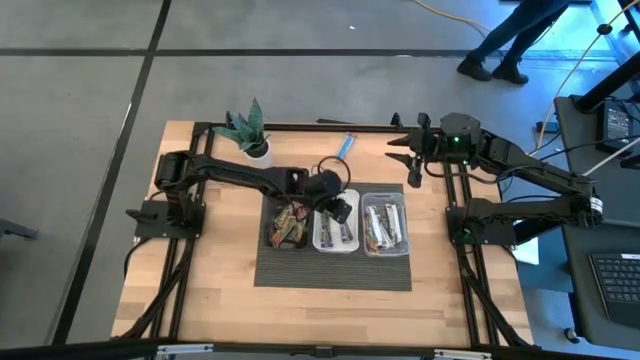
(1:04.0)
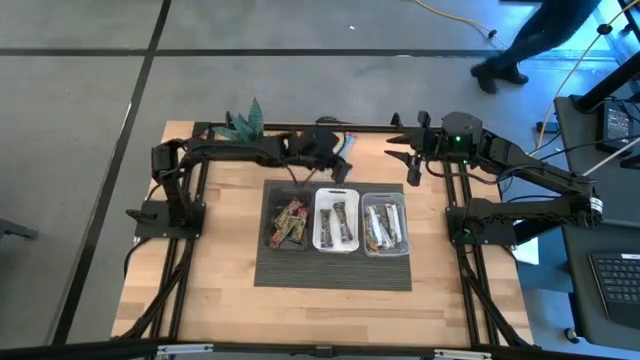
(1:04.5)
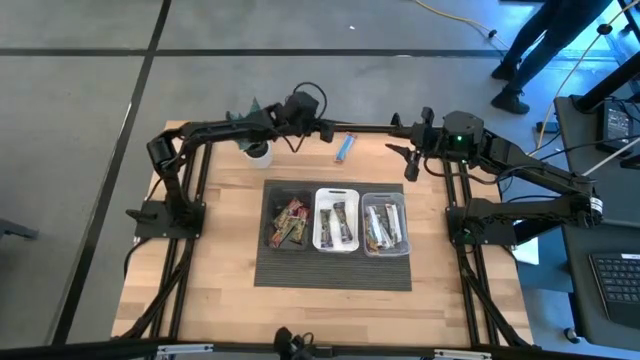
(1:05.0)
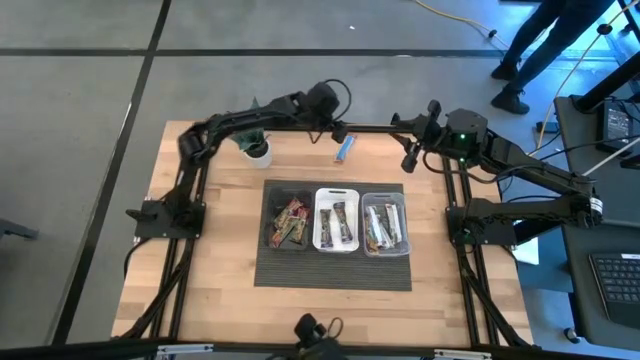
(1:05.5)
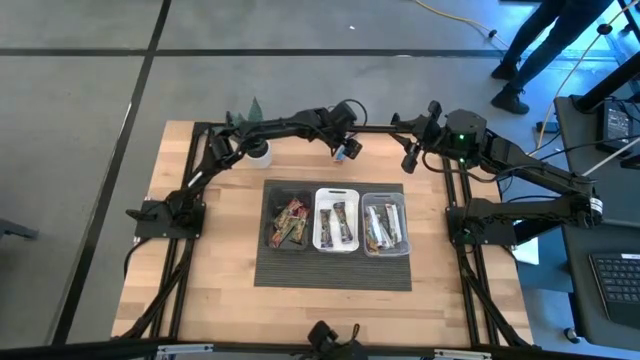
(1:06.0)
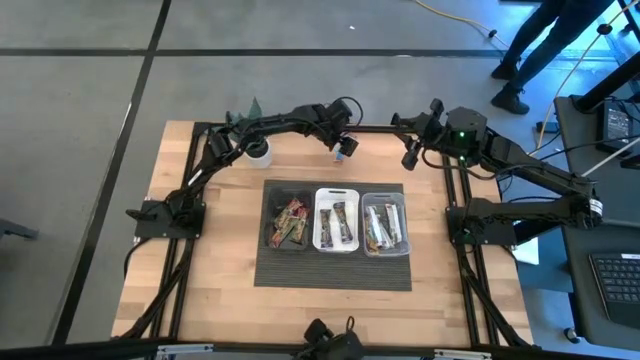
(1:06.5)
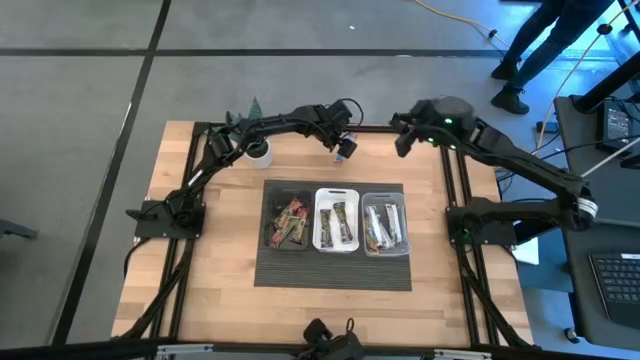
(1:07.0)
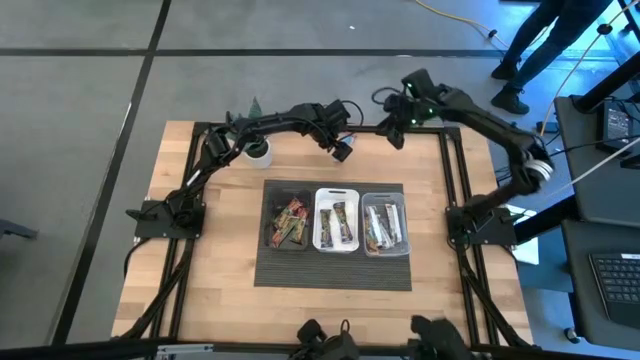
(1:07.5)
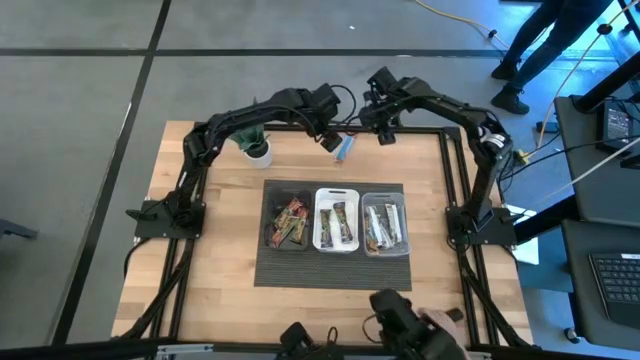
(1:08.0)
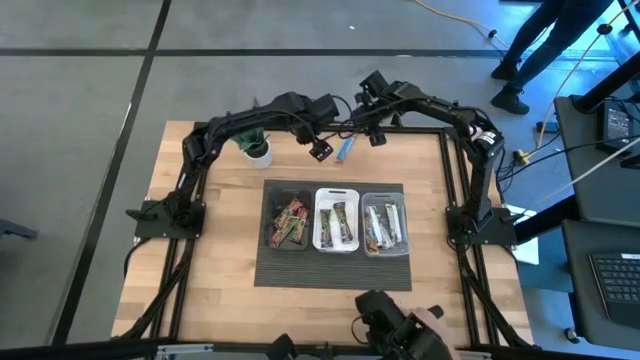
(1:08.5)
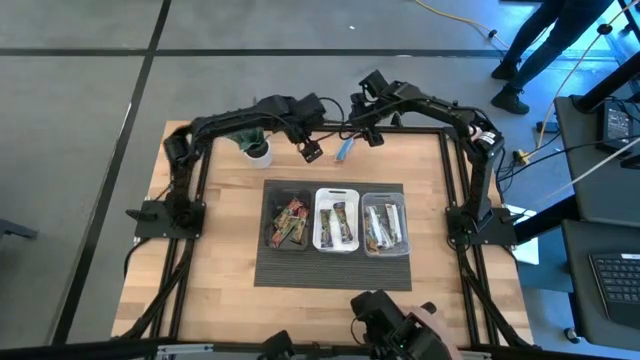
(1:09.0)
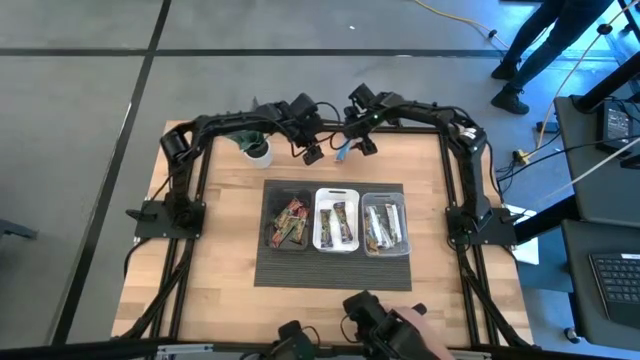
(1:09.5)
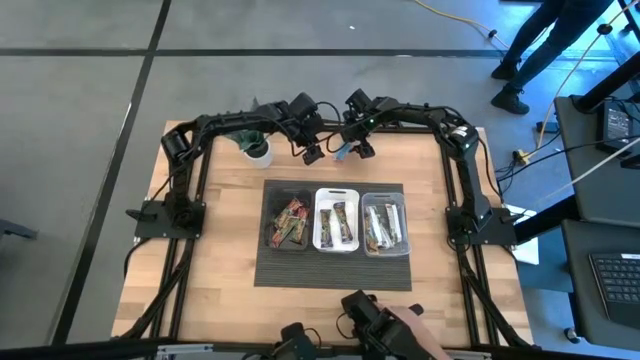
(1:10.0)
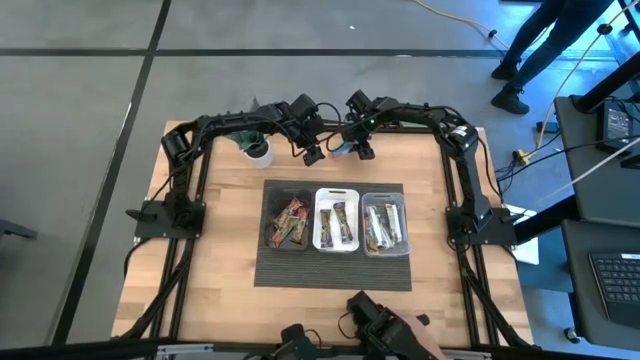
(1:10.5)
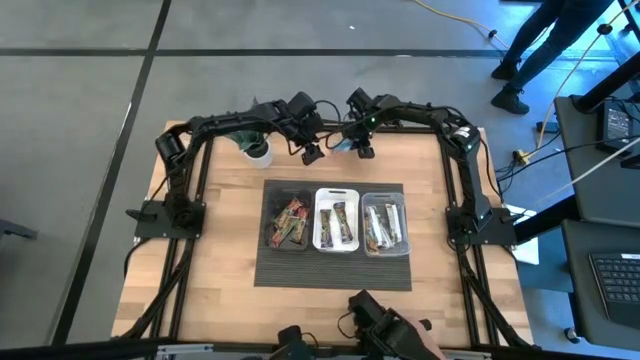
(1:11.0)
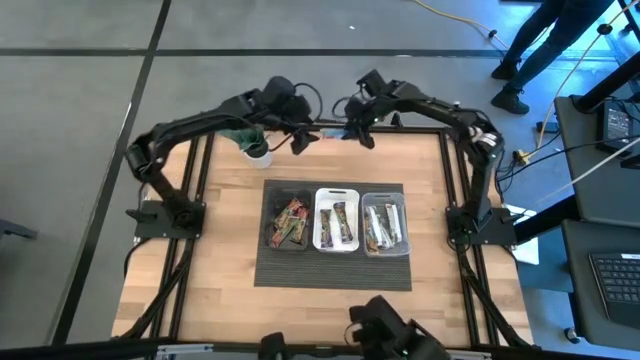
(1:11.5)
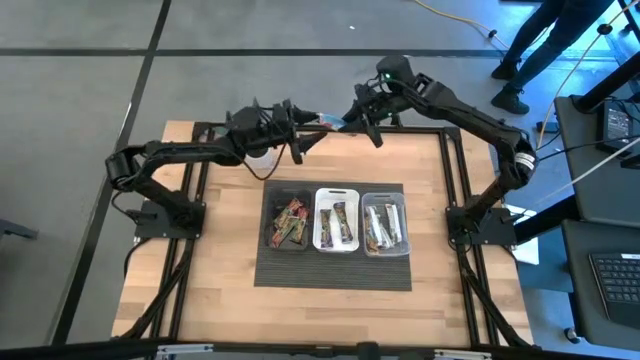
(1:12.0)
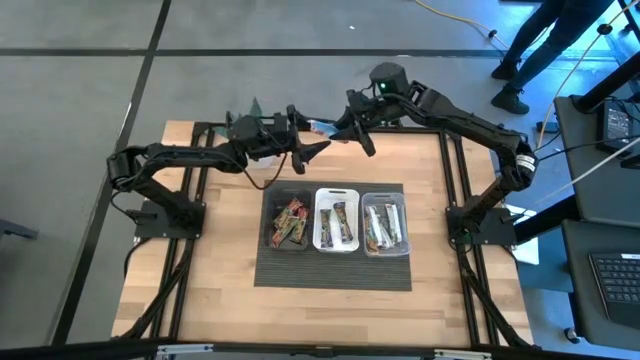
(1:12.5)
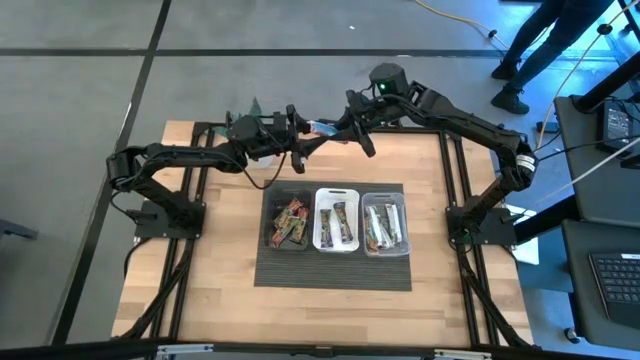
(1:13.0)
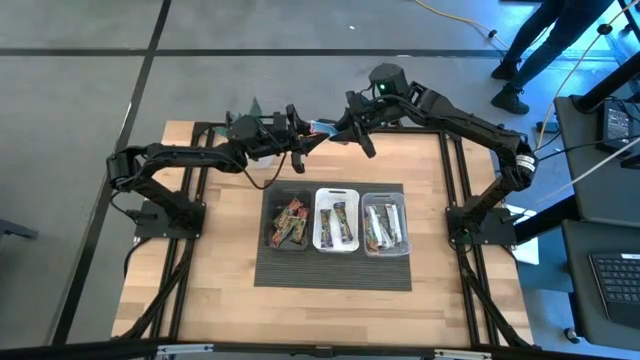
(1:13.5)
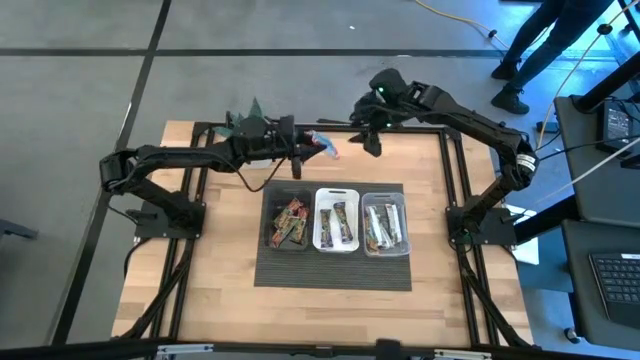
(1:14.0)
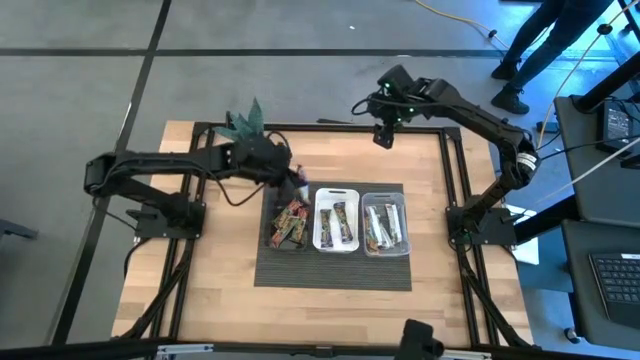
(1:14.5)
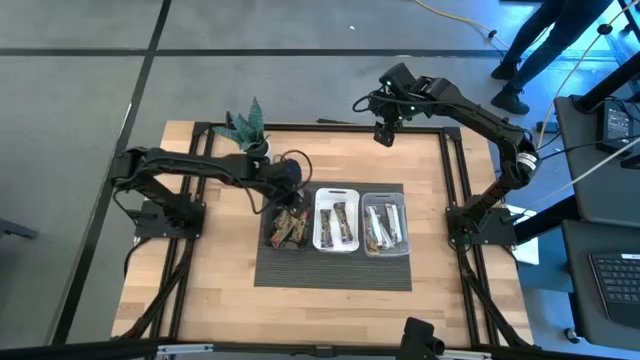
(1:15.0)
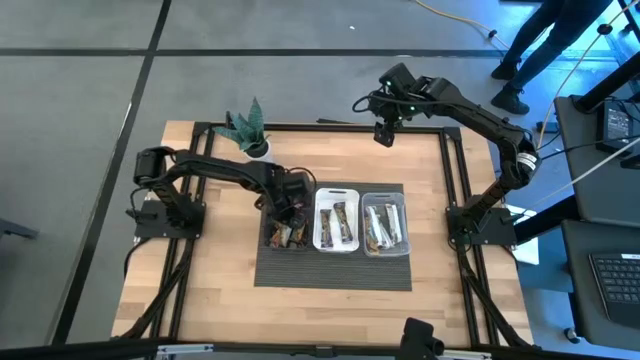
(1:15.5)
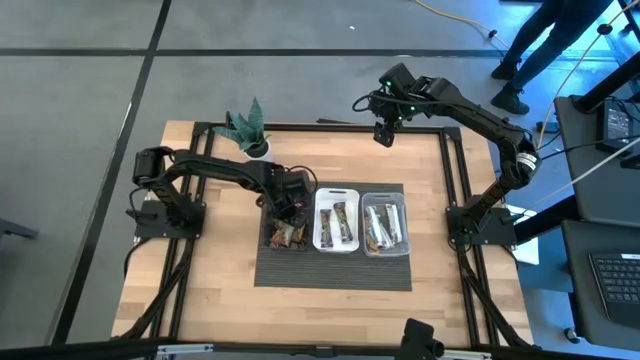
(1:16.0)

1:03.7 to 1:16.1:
Task: Pick and place Granola Bars by type
Put the red granola bar into the black bin

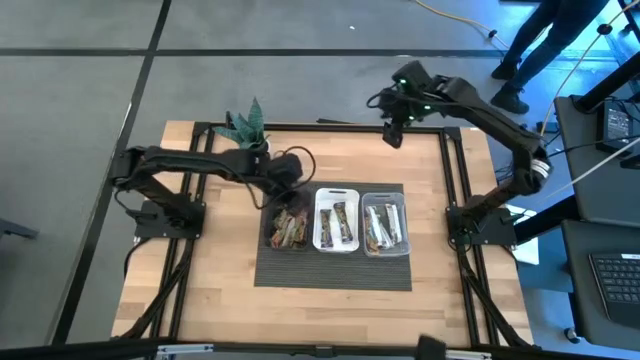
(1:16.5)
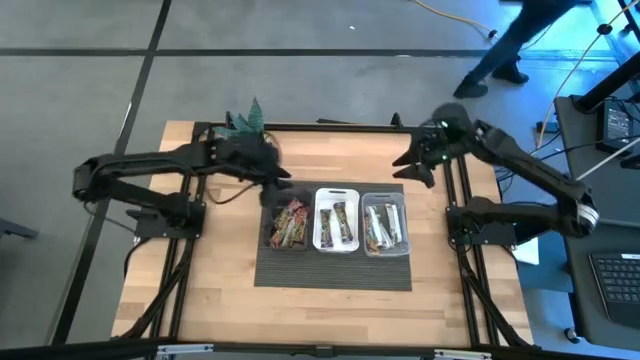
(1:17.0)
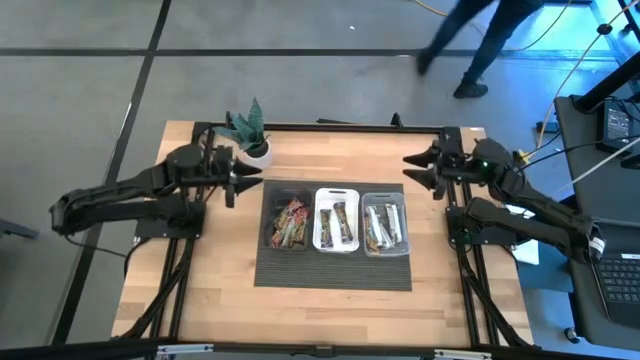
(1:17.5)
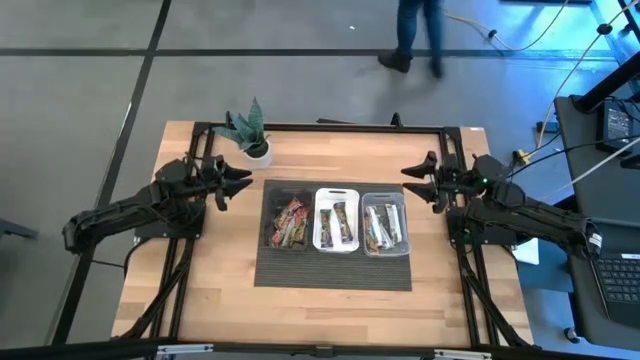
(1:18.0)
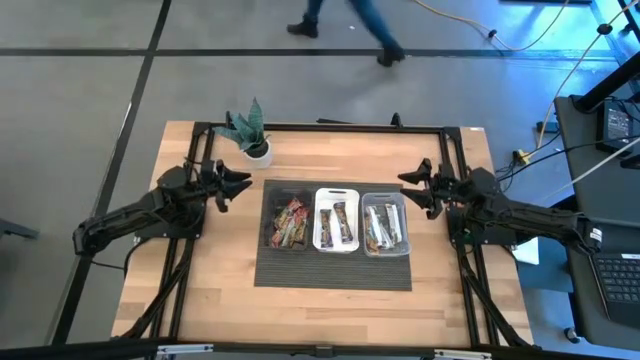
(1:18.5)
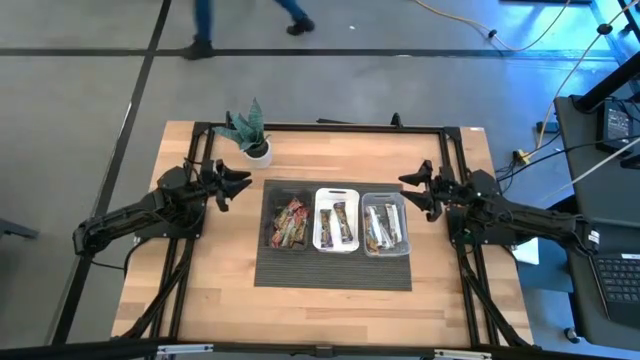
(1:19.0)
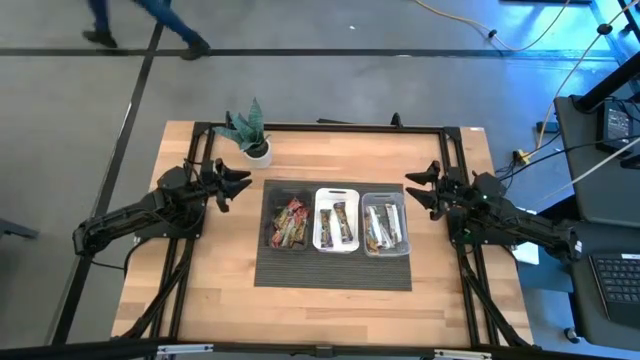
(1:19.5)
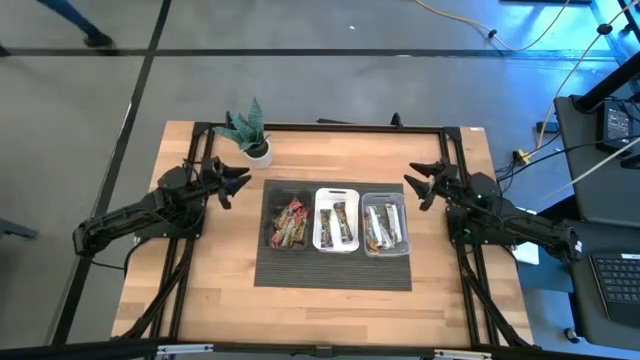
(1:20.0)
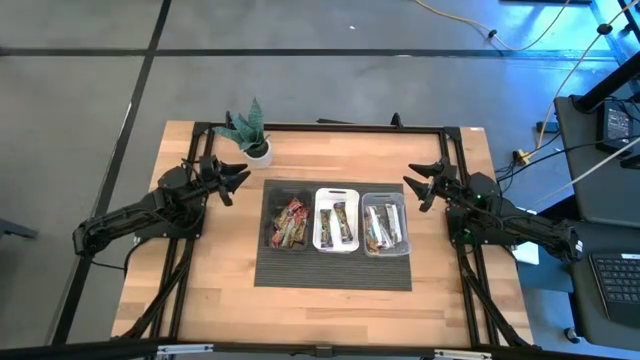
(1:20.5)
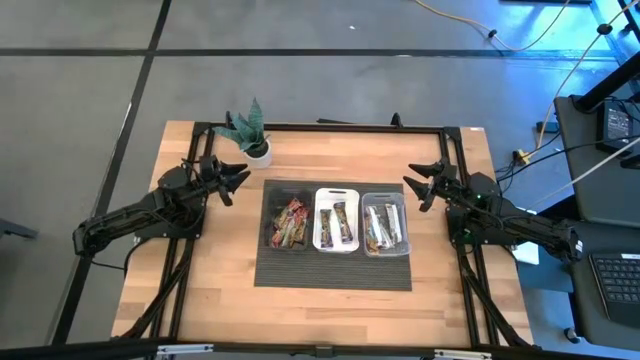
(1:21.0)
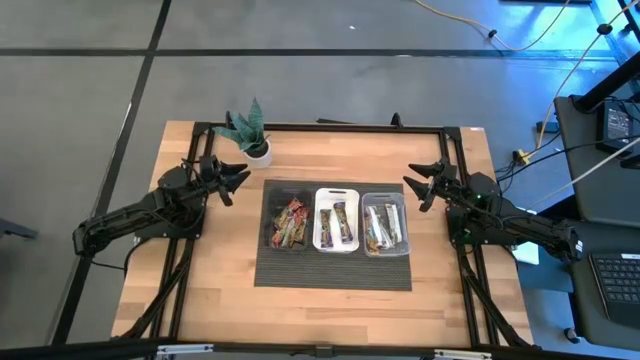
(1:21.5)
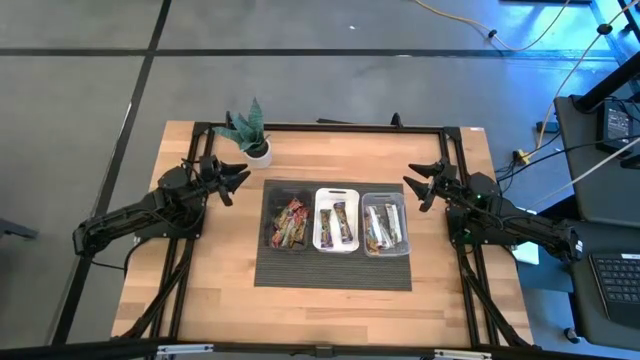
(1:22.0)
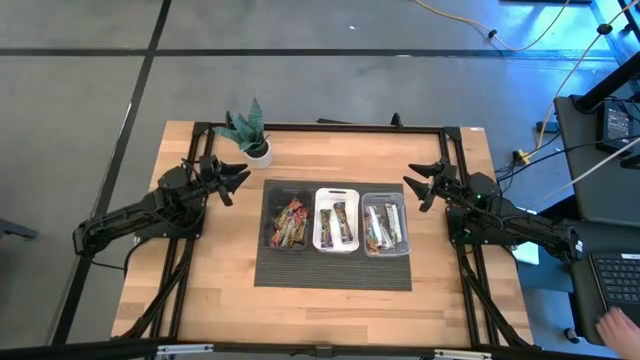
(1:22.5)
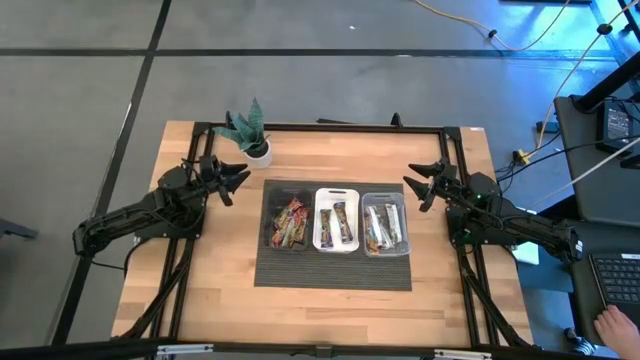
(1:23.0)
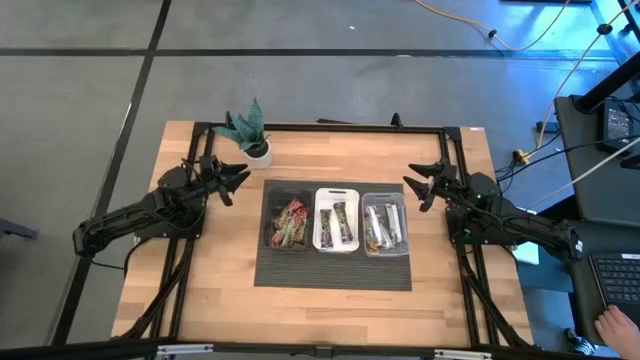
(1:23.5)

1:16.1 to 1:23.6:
Return to Home Position

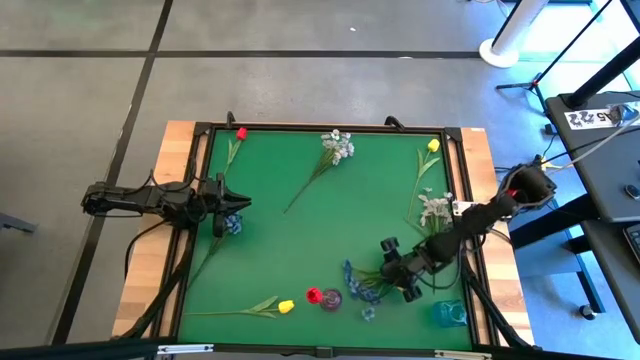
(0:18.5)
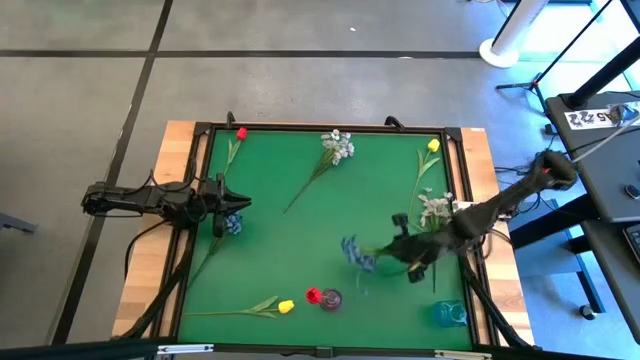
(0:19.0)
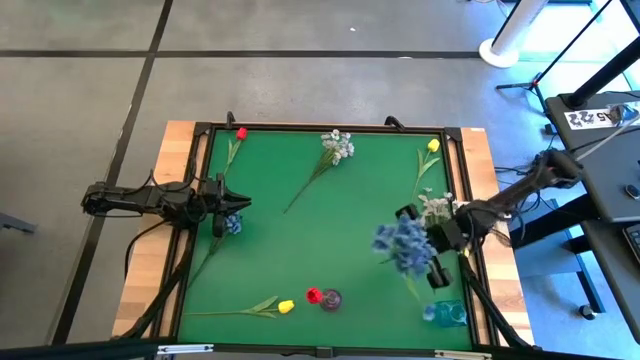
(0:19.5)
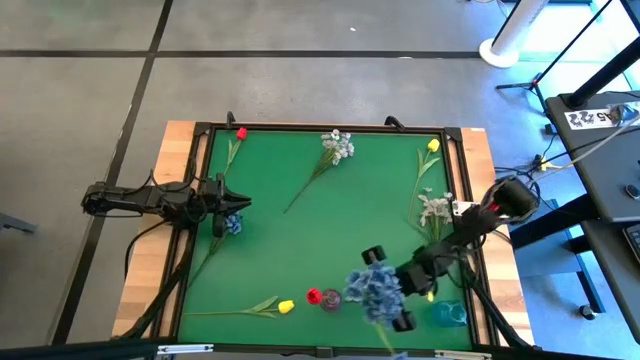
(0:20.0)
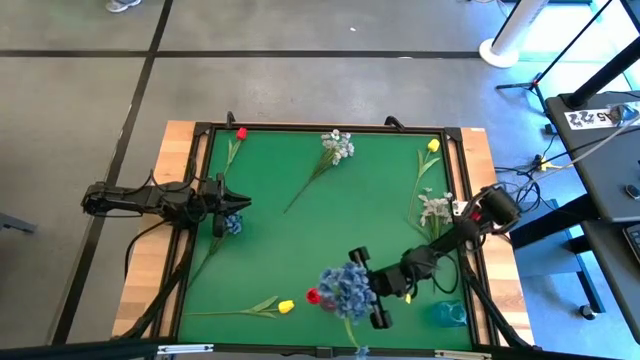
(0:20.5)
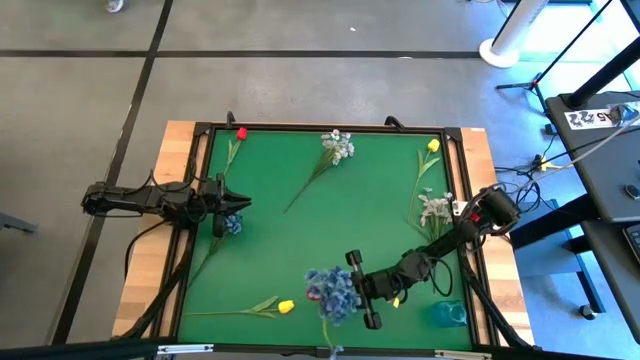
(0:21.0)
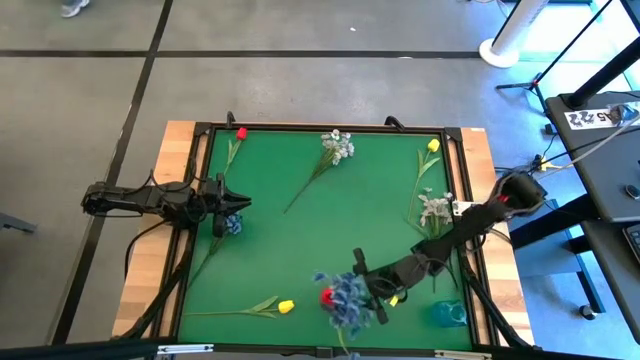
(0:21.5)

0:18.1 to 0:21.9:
Task: Sort flowers into vase by color
Put the right blue flowers into the violet vase
